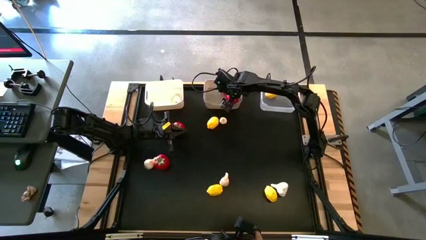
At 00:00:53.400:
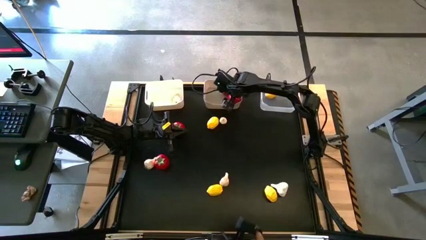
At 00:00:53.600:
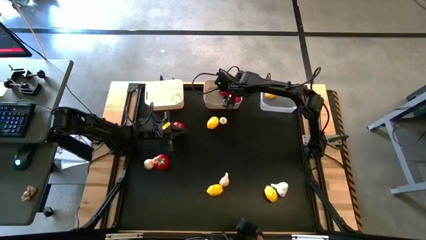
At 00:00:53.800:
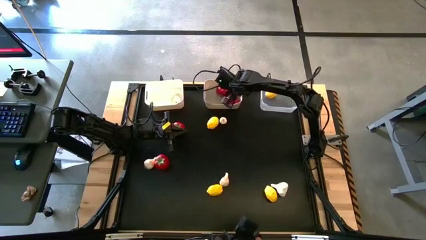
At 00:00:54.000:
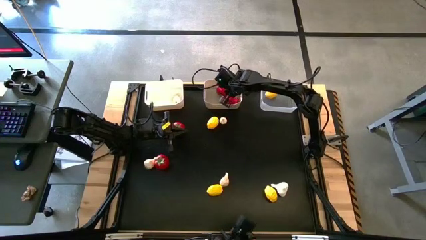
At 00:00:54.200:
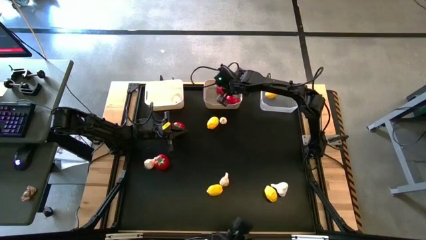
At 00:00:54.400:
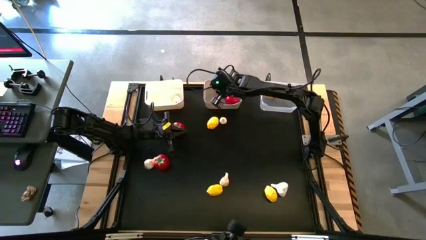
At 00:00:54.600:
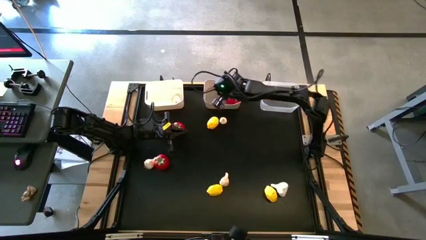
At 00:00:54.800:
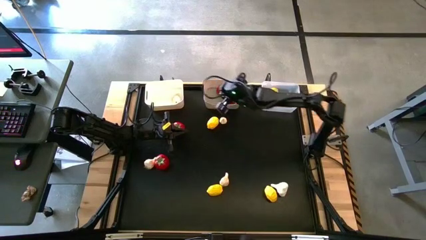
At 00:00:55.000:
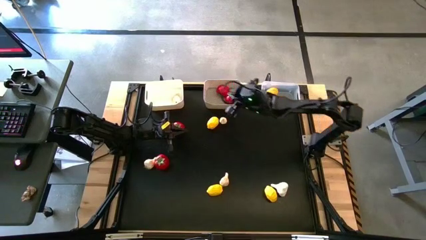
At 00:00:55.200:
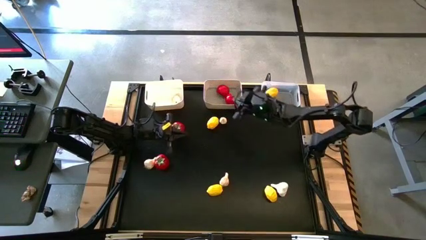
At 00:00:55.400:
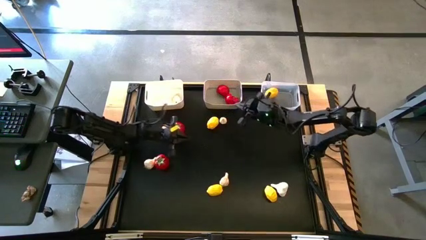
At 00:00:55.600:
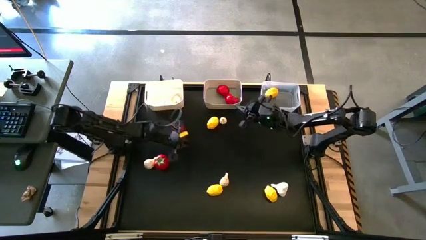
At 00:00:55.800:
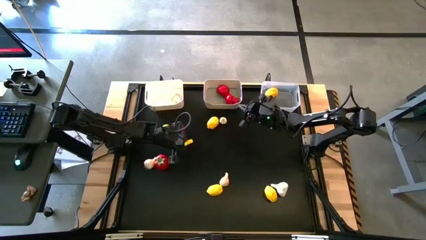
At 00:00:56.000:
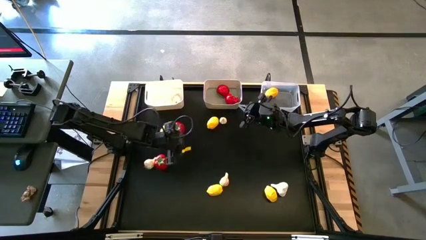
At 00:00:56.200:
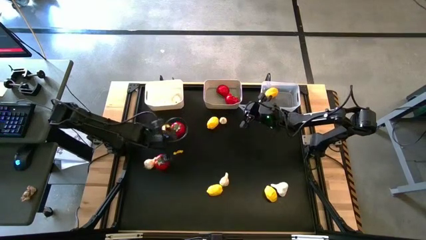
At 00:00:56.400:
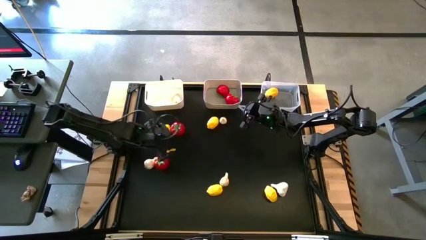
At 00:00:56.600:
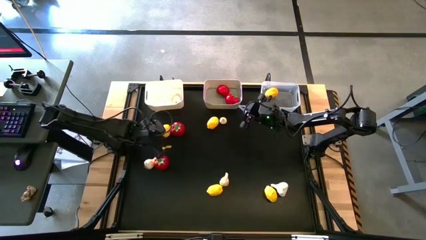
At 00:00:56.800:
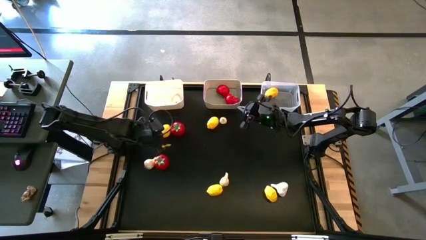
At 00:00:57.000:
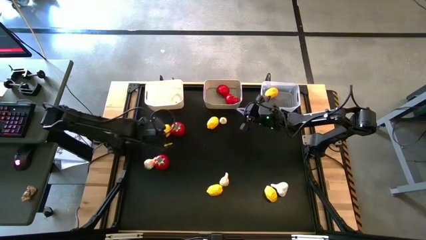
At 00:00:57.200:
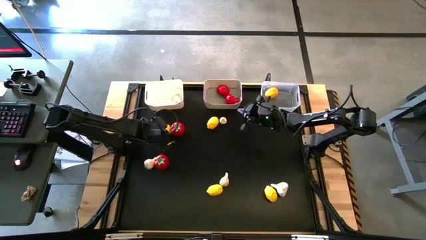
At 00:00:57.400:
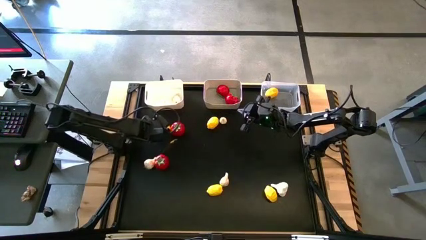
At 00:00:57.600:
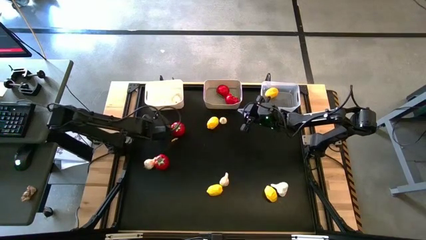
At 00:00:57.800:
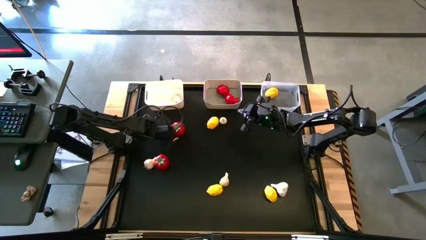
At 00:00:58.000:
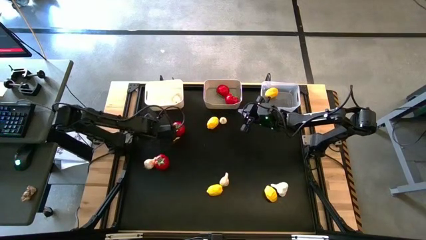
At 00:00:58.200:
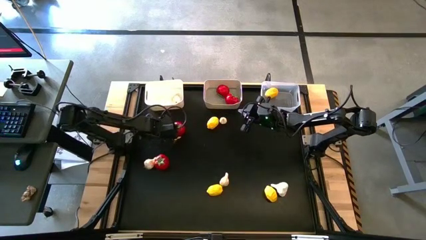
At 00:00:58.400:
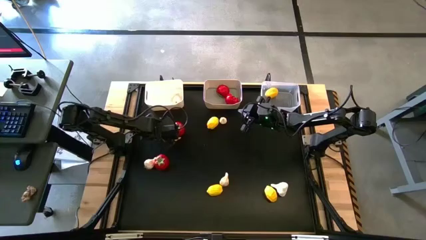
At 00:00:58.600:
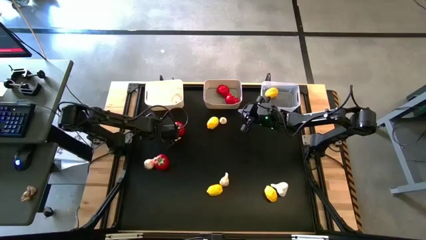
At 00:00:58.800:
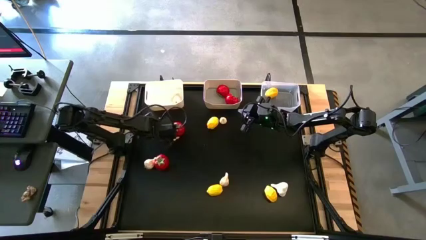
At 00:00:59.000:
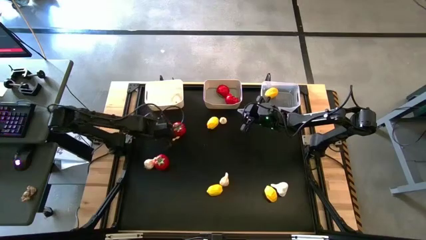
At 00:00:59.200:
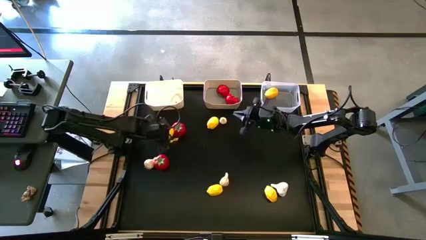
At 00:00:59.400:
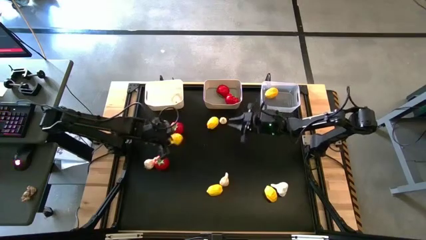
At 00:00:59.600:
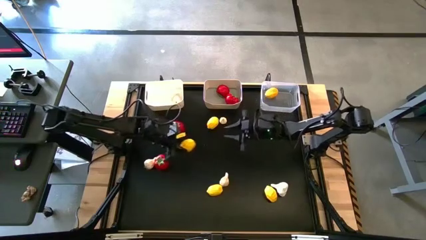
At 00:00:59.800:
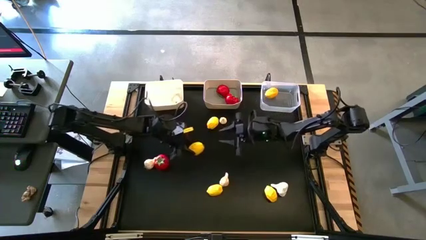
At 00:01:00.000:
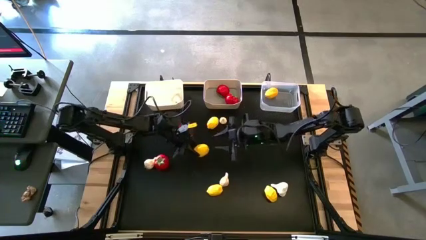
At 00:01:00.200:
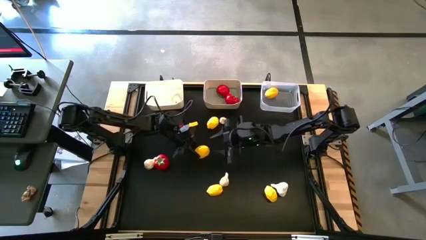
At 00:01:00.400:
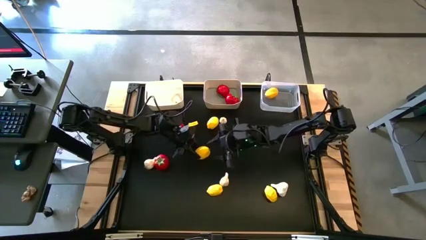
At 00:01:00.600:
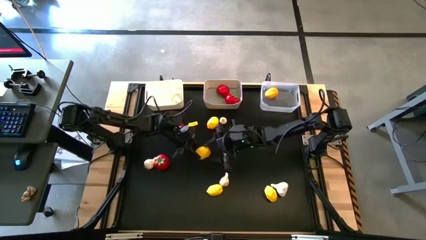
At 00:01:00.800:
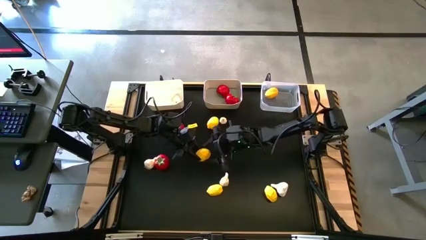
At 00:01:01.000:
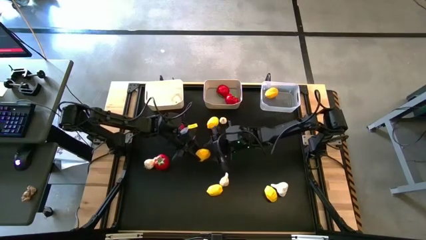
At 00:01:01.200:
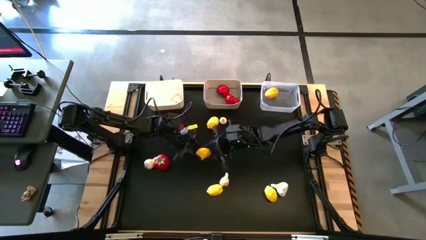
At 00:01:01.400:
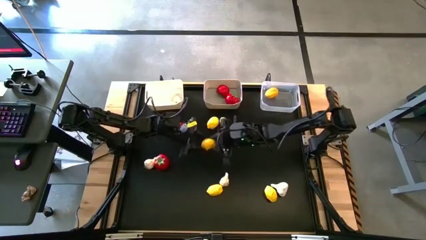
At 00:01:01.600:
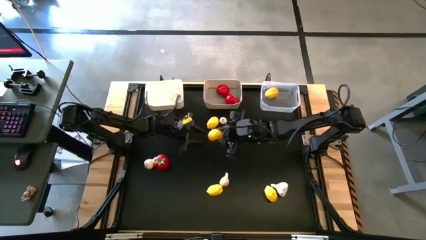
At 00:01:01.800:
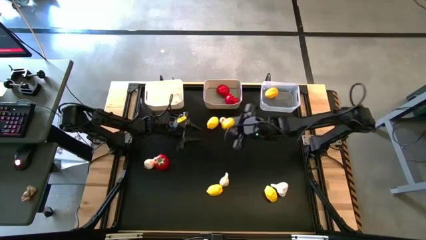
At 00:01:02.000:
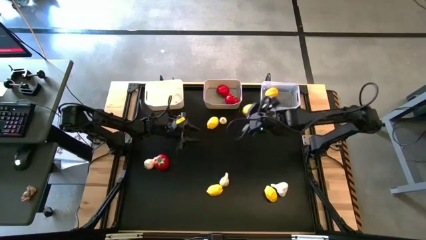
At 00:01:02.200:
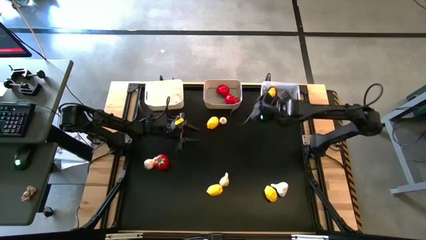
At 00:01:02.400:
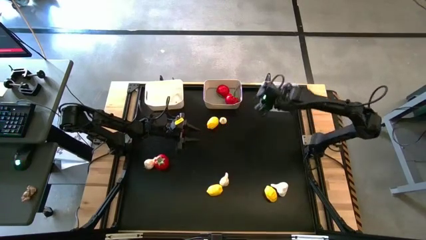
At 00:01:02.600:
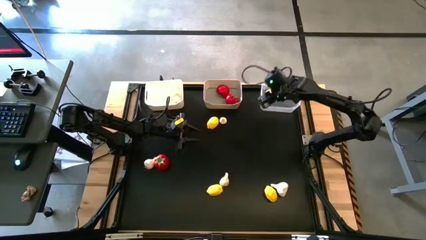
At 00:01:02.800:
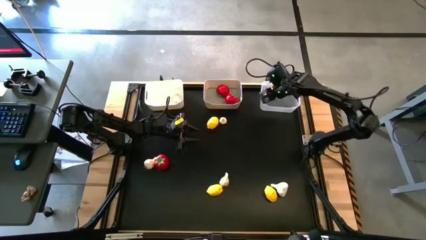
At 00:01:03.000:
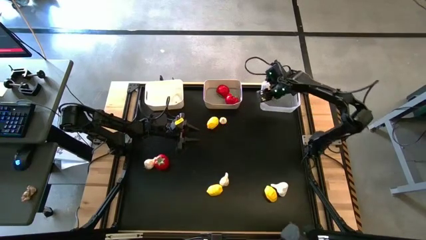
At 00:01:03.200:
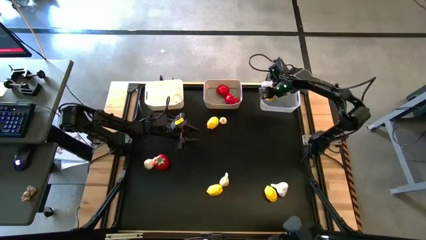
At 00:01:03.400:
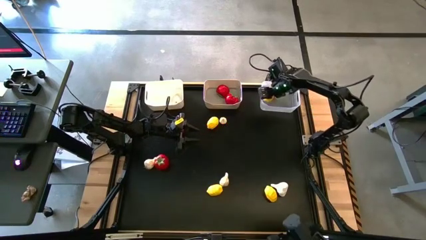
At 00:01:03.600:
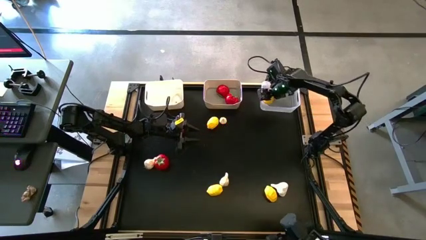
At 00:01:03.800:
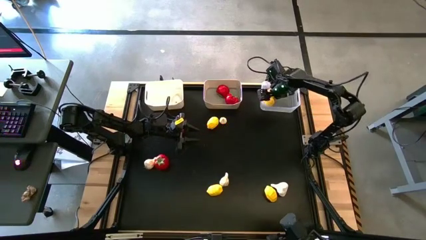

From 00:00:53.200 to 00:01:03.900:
Task: Sort produce into baskets
Put the top left lemon into the transparent bin

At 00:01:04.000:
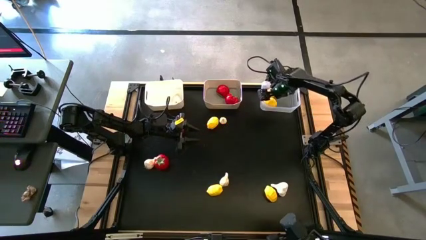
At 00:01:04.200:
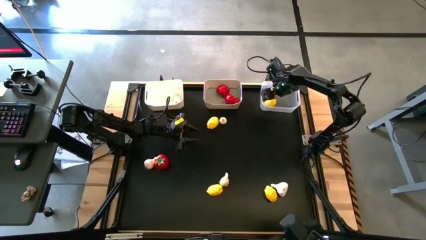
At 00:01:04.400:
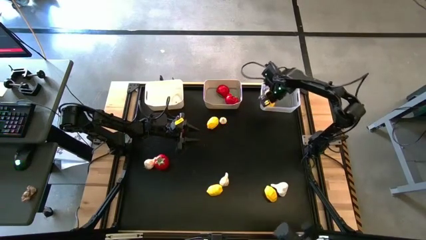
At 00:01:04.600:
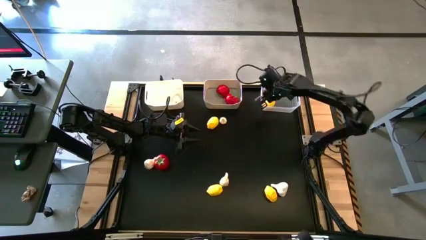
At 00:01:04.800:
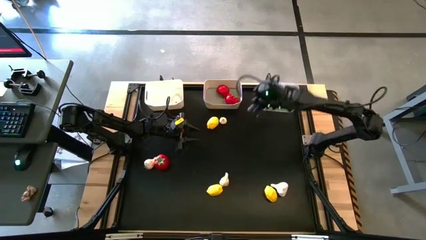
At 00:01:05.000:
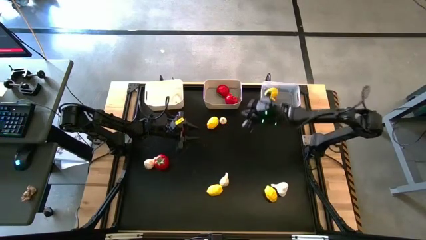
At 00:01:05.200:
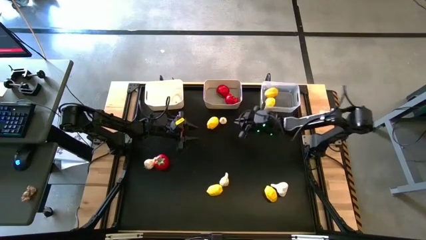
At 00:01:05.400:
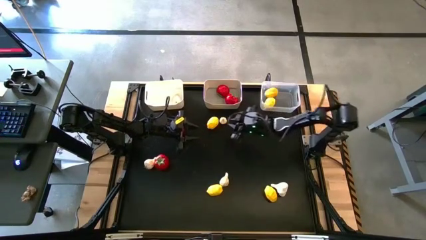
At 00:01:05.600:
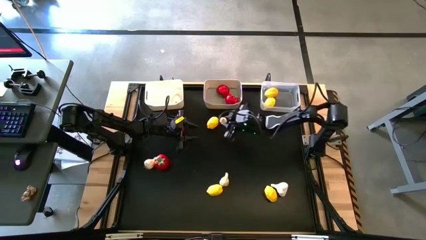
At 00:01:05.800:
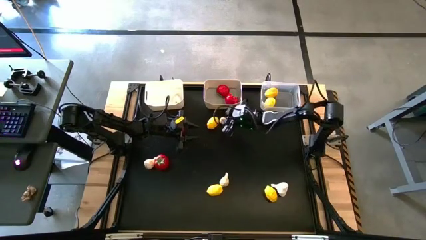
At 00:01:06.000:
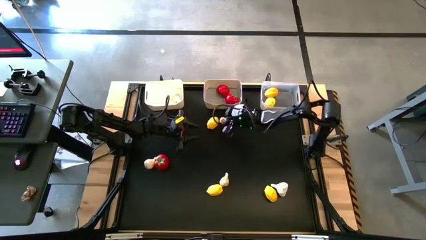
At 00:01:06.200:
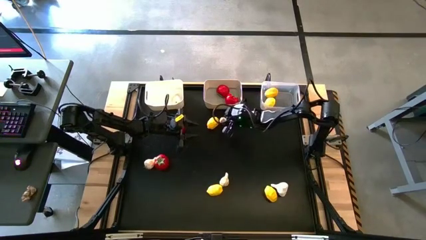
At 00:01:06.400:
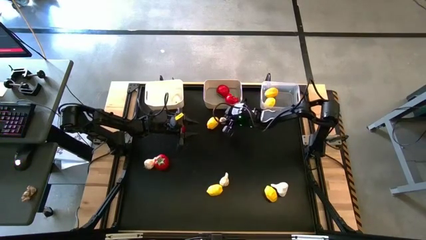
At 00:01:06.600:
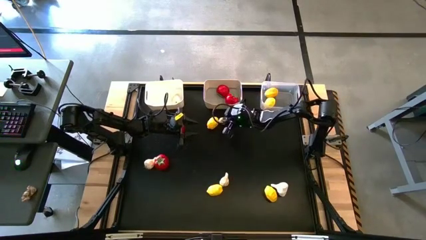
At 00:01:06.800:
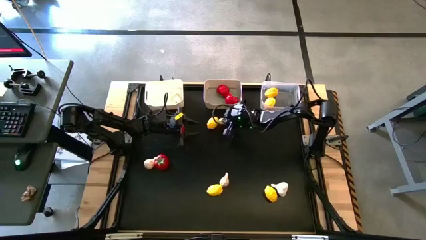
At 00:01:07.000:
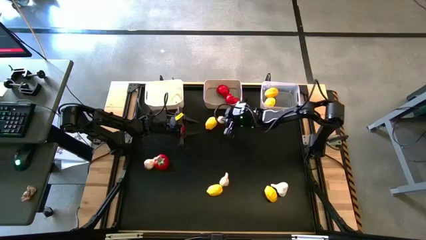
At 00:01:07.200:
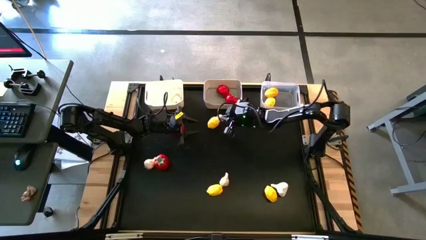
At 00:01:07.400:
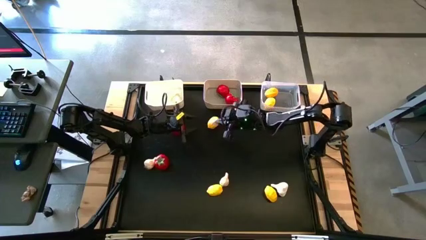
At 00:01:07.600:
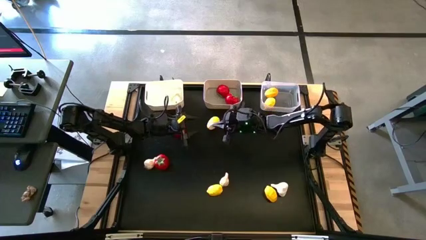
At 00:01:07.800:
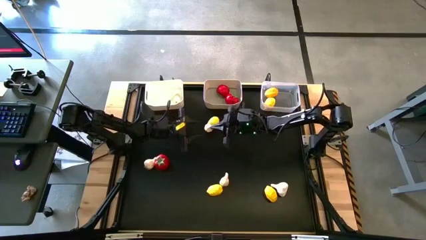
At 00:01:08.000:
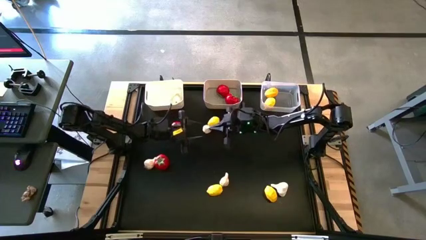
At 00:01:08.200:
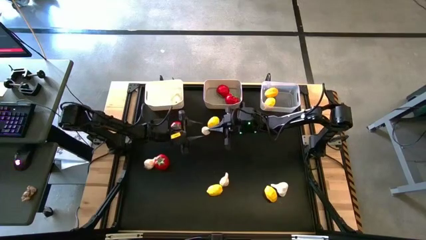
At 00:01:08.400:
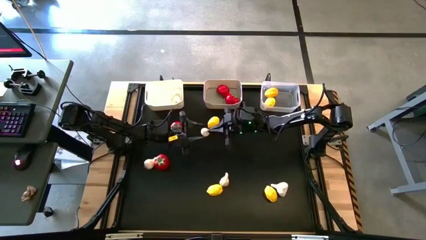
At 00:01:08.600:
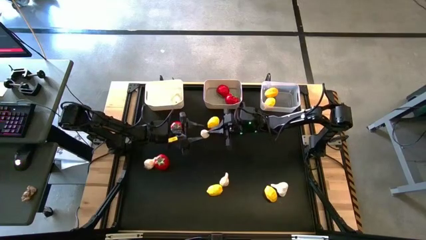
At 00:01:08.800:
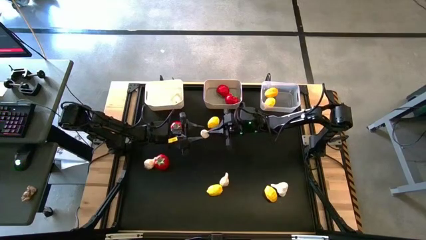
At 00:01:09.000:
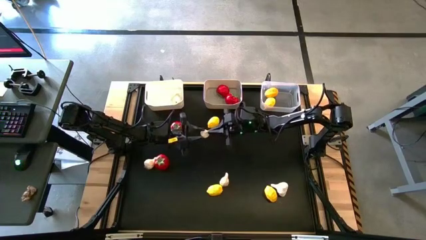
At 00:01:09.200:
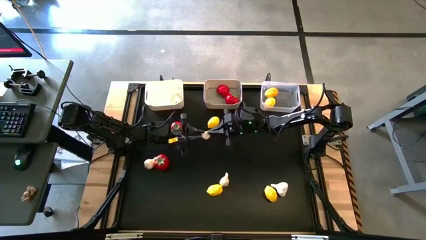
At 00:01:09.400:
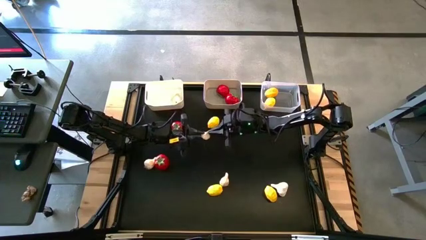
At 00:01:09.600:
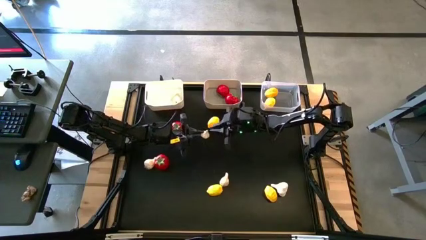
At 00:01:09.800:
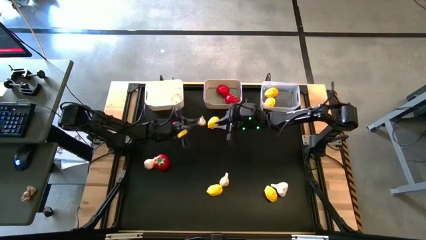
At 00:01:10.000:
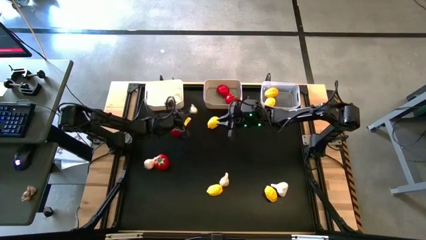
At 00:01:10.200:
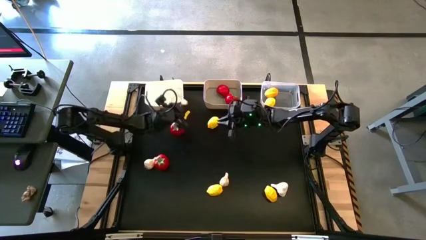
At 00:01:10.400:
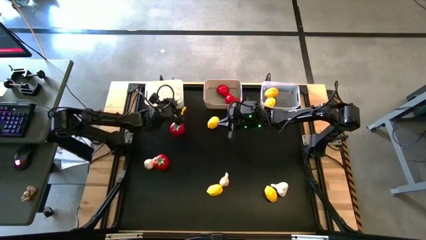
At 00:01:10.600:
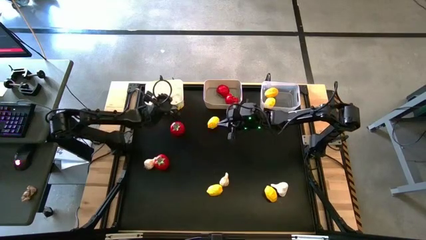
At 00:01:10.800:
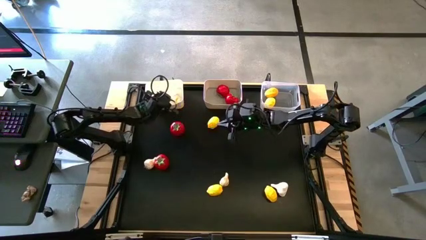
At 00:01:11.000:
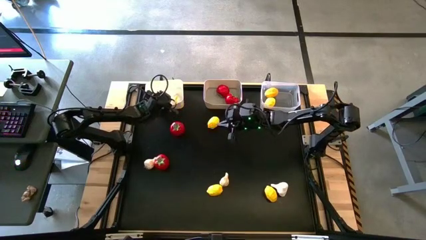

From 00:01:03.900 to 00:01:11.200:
Put the top garlic into the white bin
